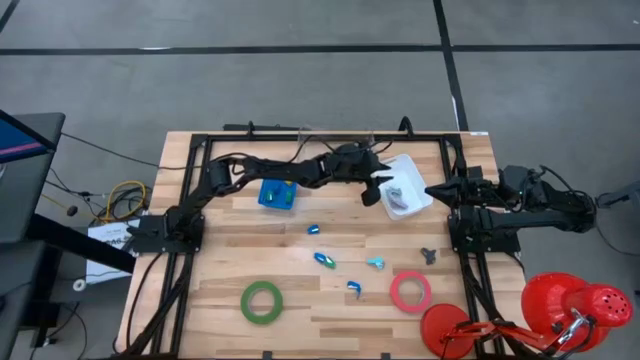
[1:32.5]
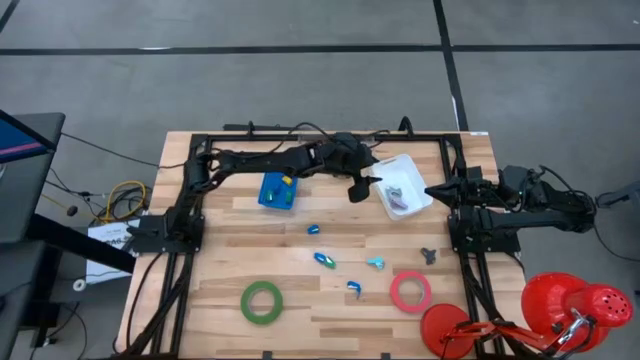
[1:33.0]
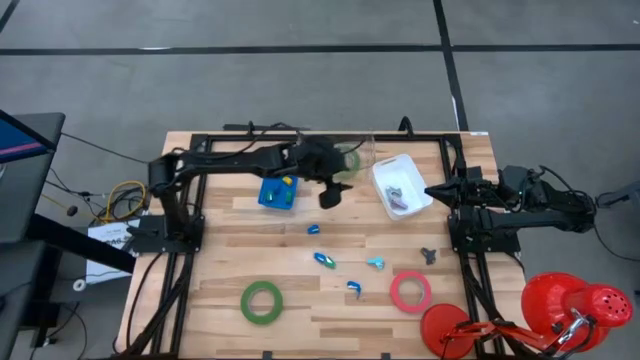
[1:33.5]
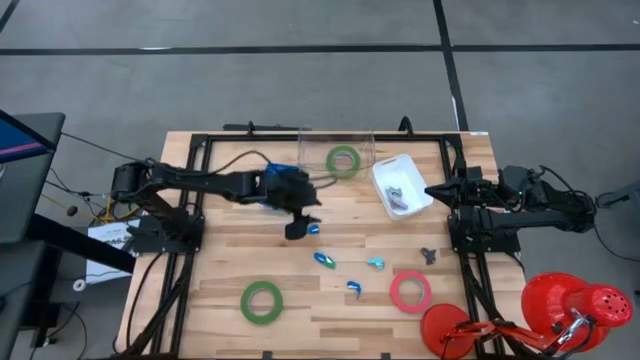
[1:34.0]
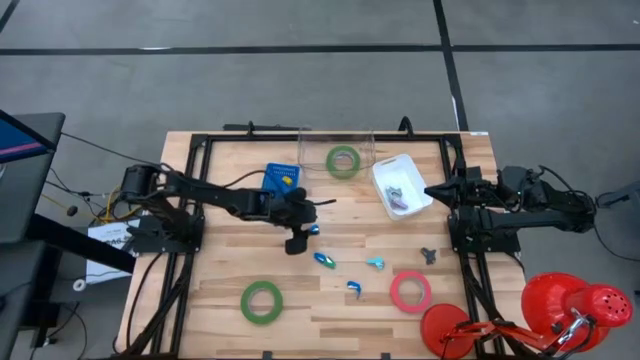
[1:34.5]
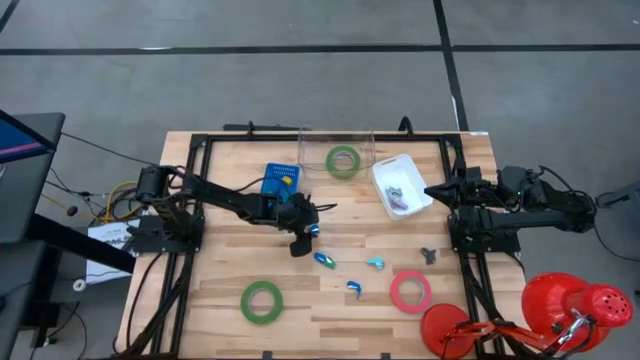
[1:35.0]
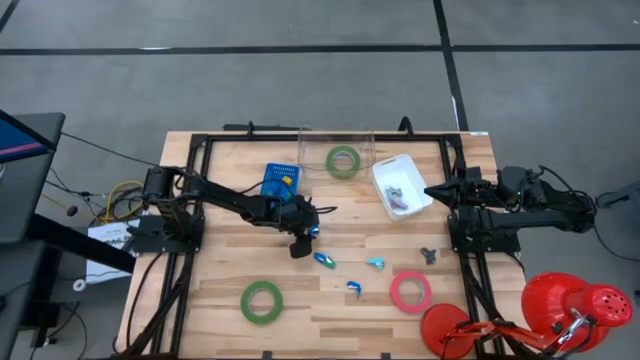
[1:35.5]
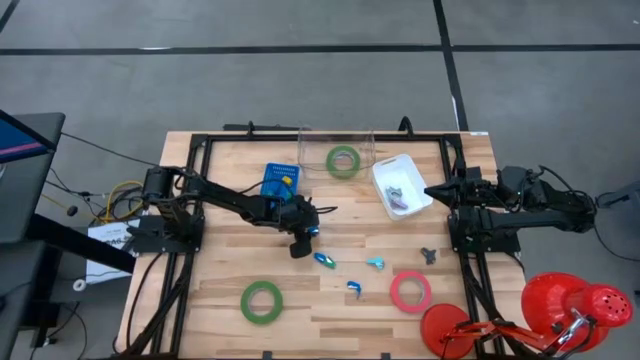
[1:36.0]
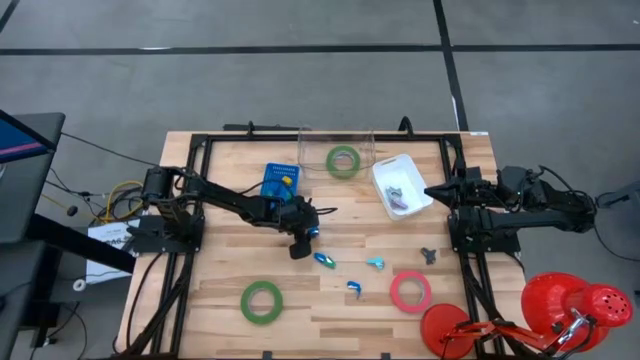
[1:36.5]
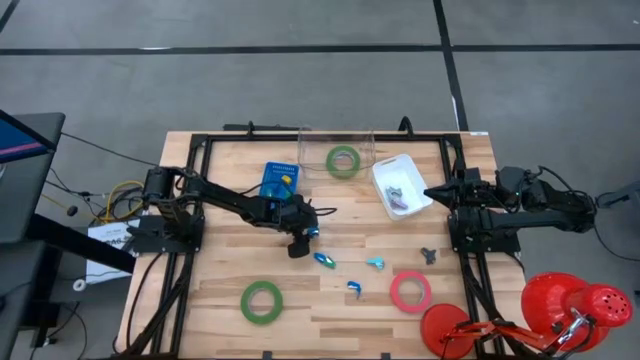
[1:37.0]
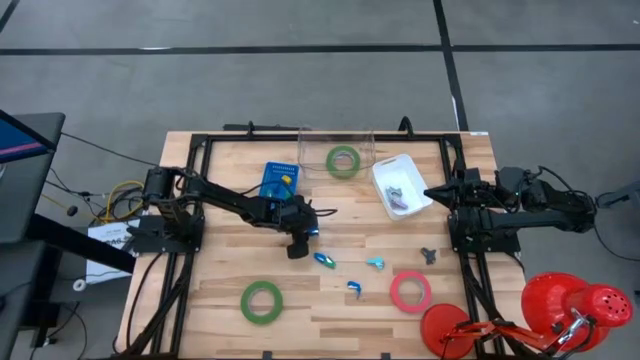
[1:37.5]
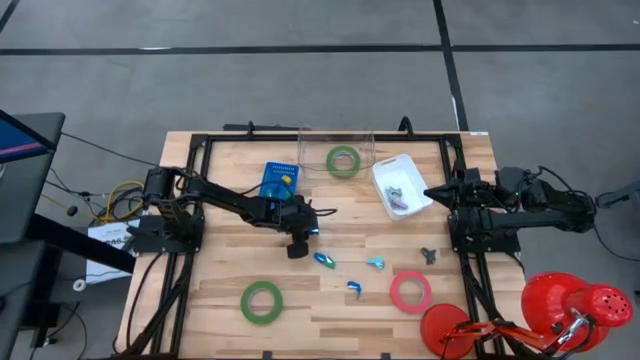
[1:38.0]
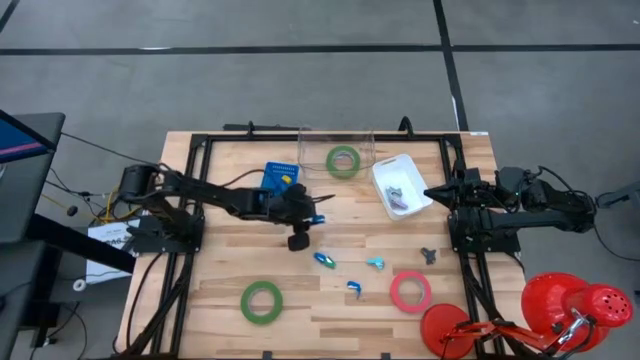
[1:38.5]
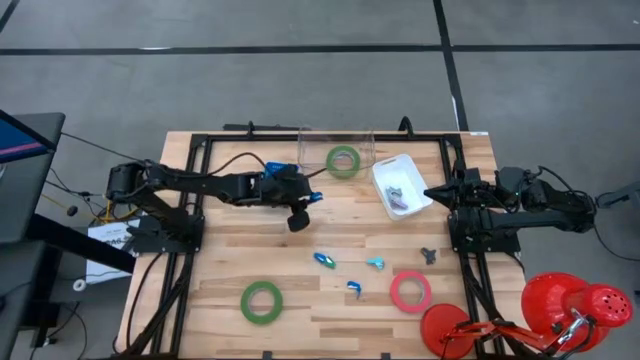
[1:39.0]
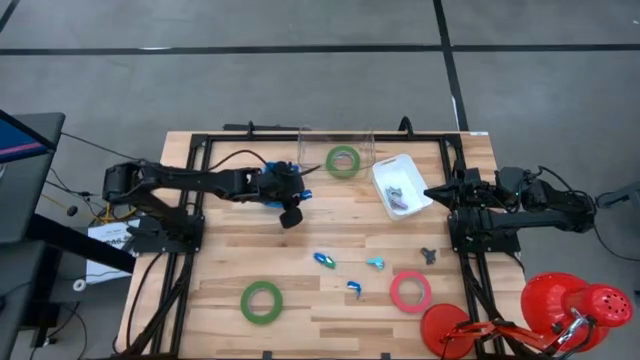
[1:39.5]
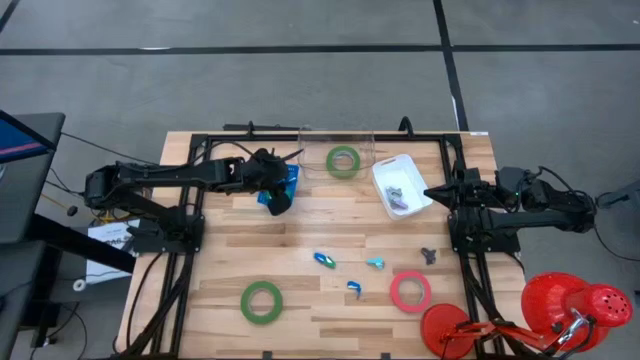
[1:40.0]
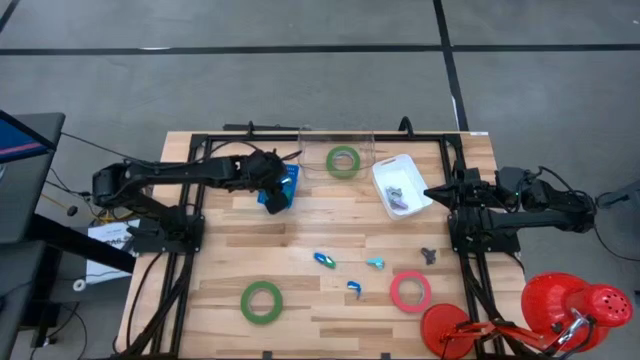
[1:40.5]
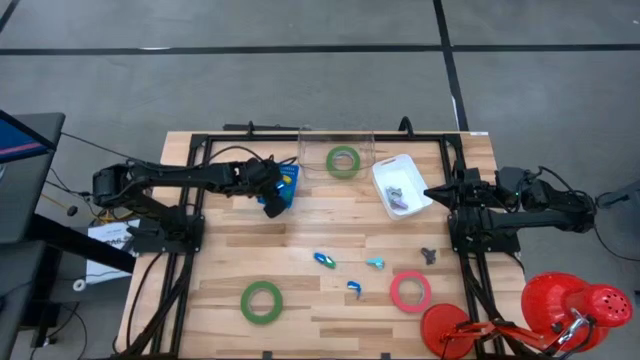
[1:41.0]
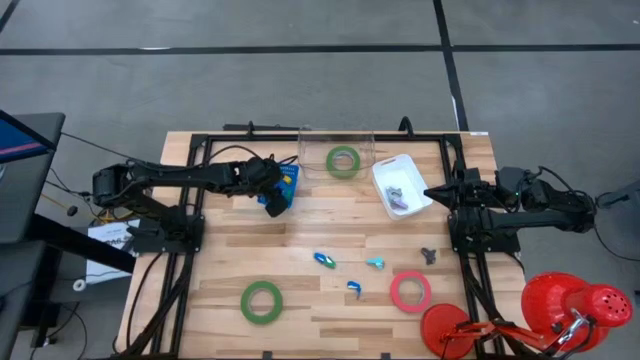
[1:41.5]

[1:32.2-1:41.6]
Task: Pick and place Stapler, Stapler remover, tape
Put the top blue stapler into the blue bin

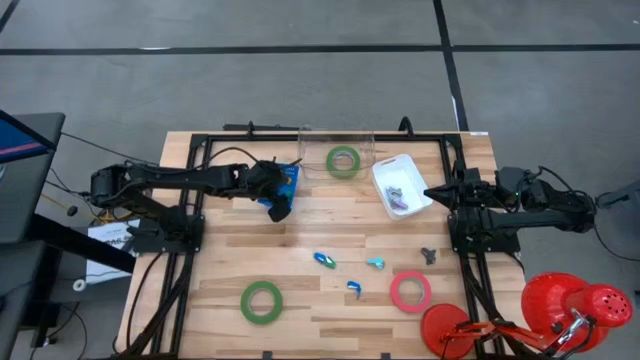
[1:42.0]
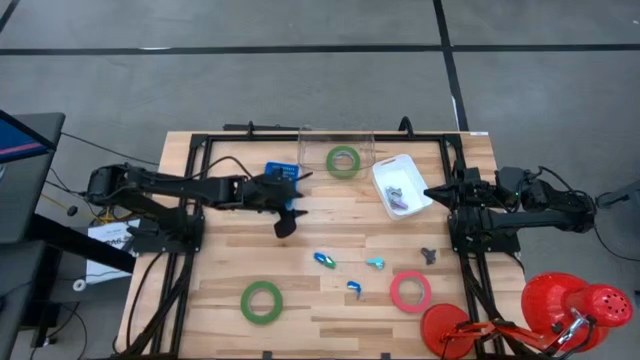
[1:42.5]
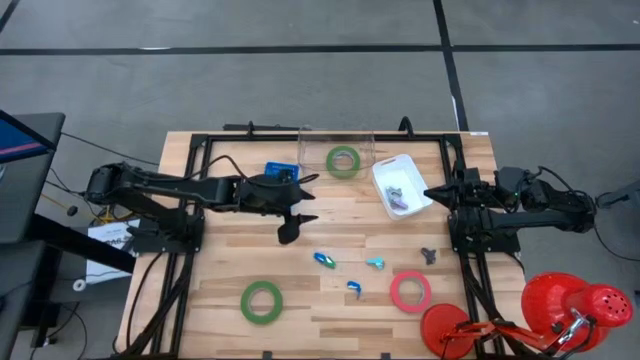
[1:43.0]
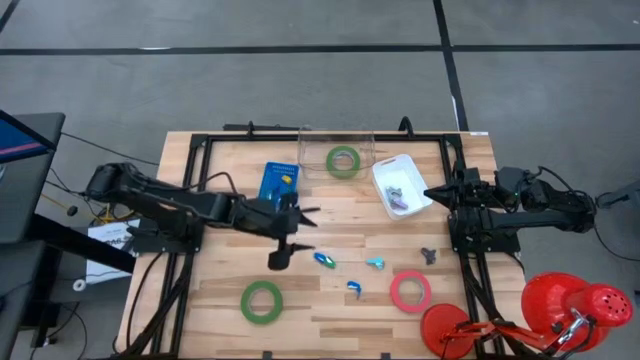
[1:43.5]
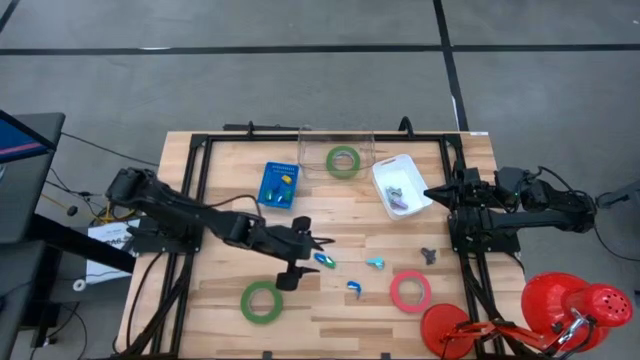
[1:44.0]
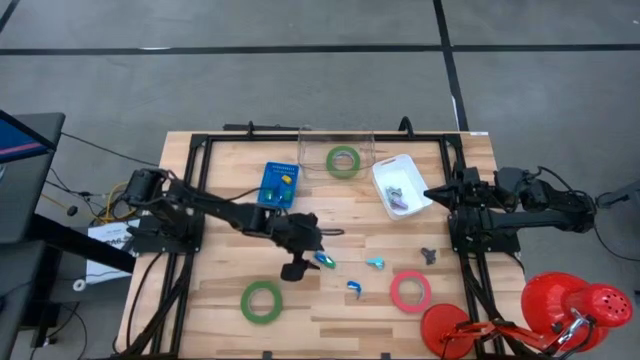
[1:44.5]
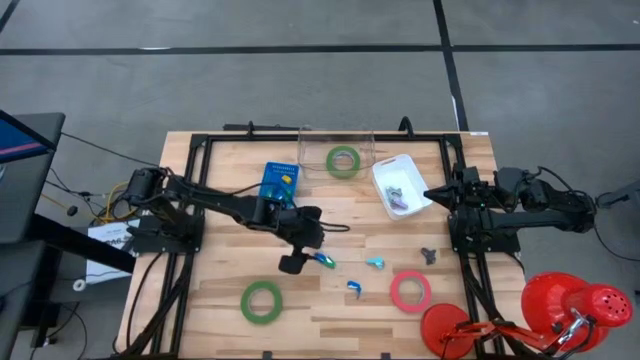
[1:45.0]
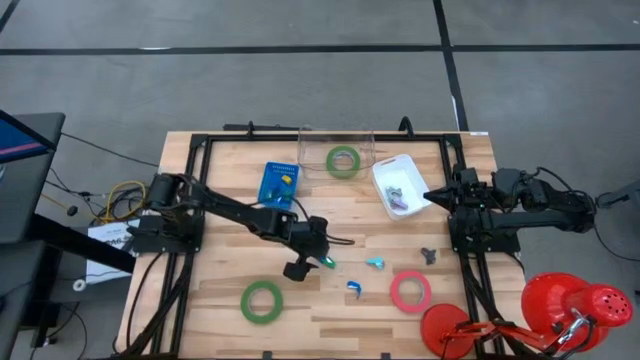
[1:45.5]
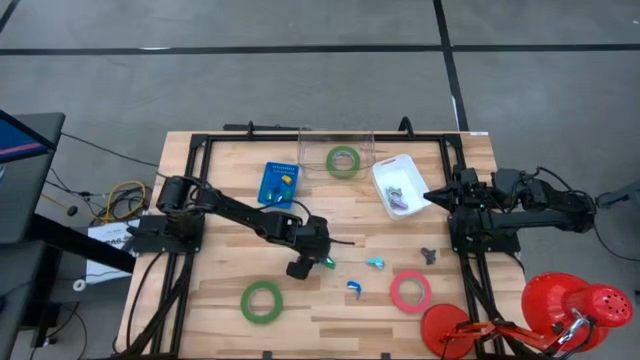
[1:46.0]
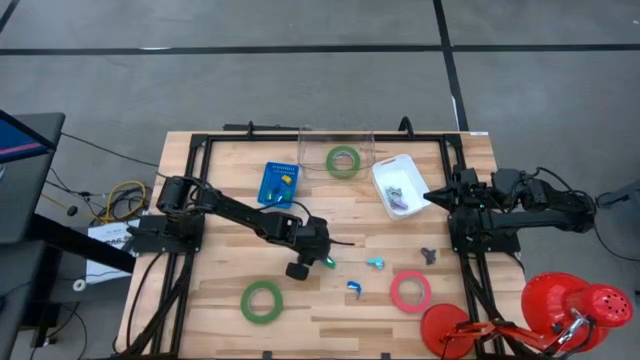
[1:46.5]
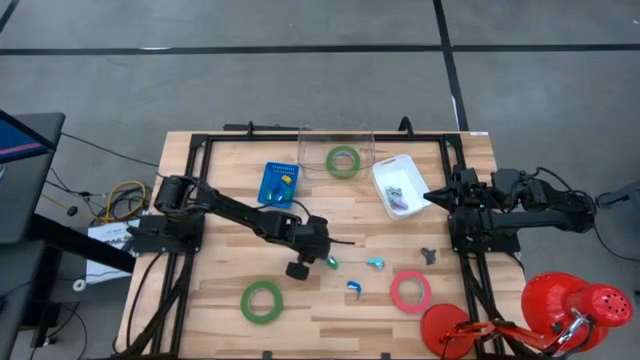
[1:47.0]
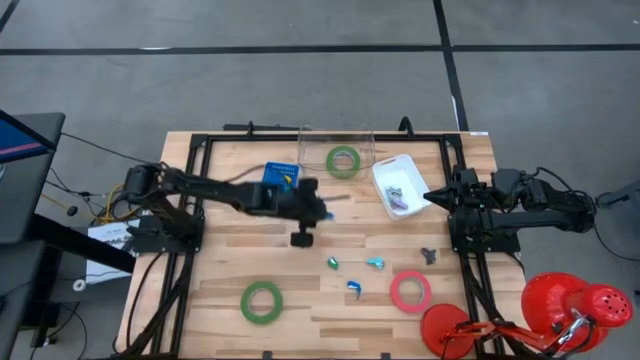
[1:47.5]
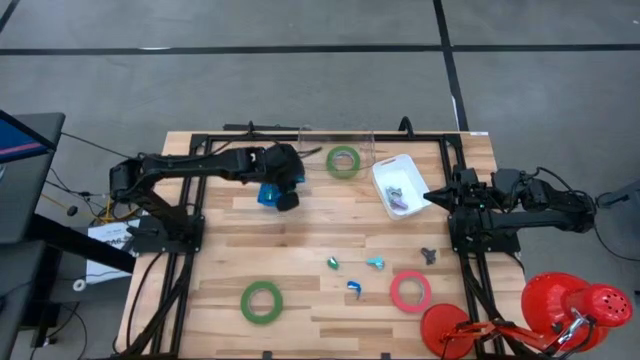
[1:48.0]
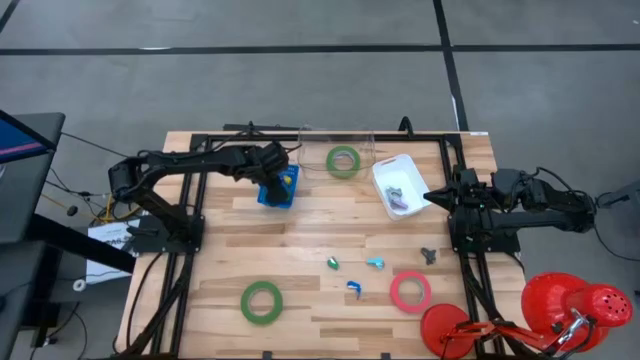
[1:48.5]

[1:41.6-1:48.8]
Put the top blue stapler into the blue bin

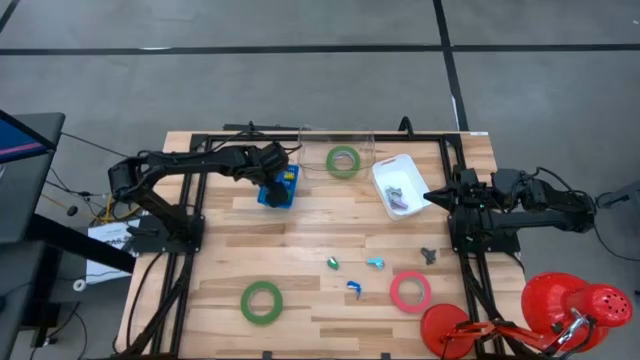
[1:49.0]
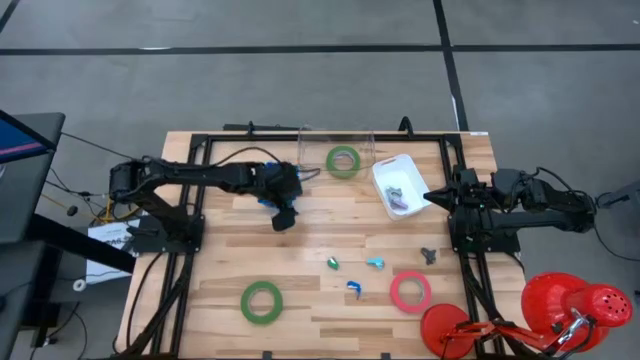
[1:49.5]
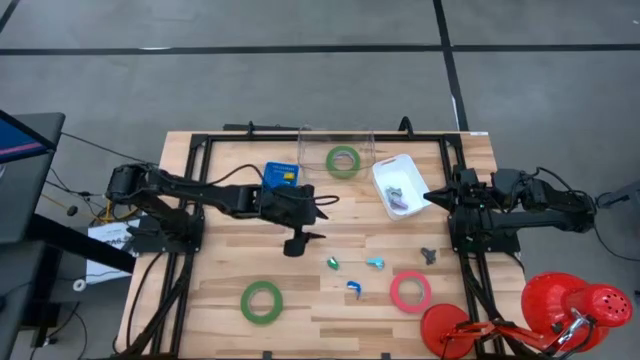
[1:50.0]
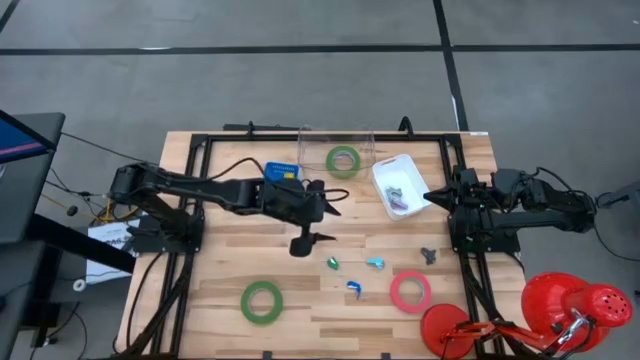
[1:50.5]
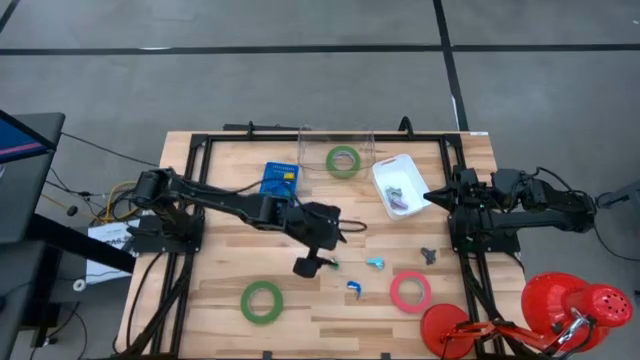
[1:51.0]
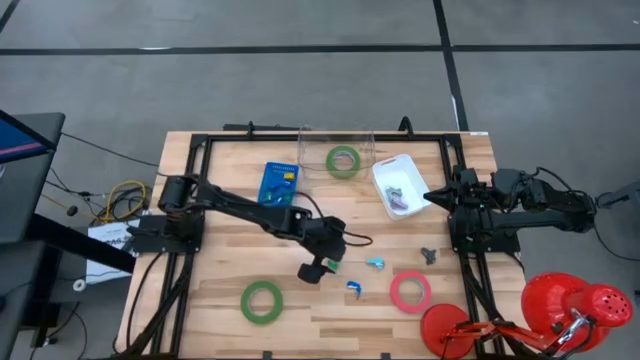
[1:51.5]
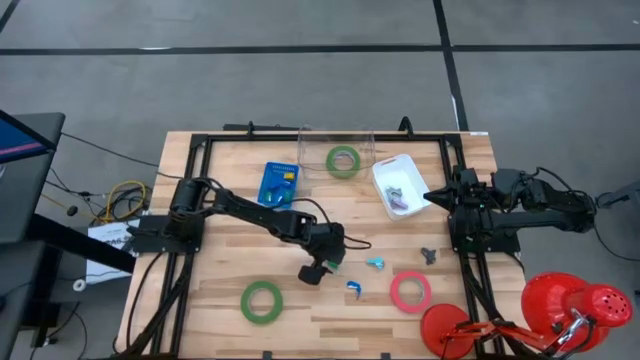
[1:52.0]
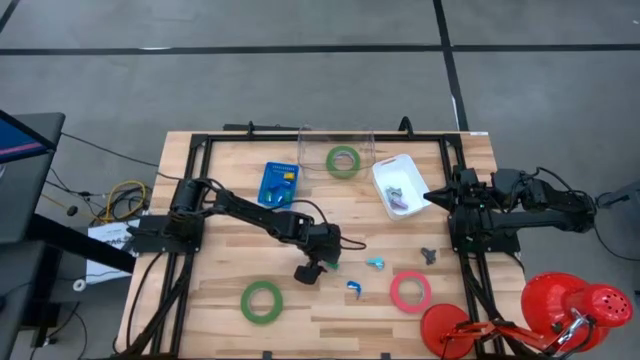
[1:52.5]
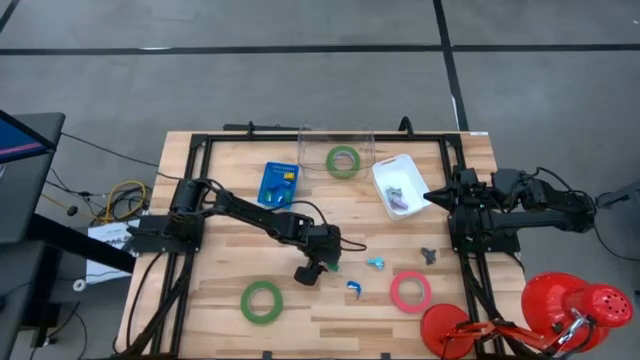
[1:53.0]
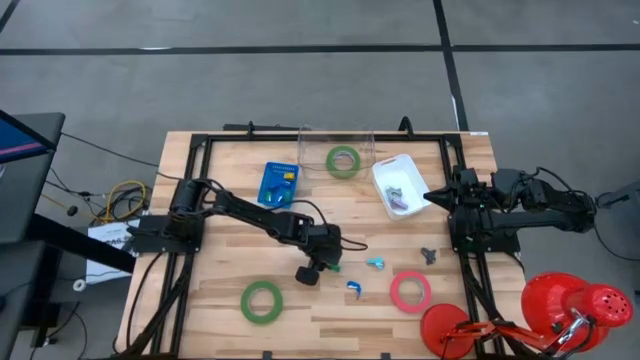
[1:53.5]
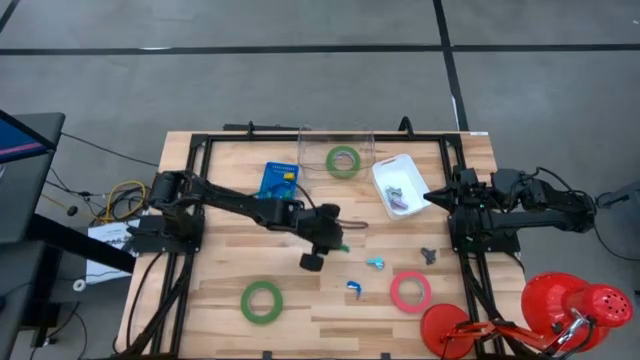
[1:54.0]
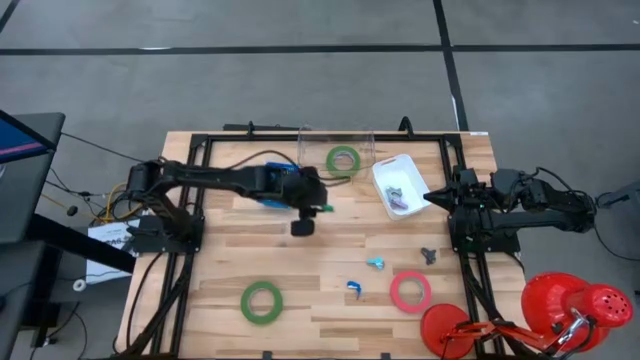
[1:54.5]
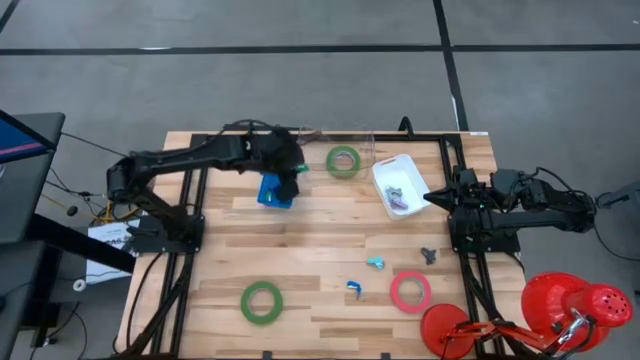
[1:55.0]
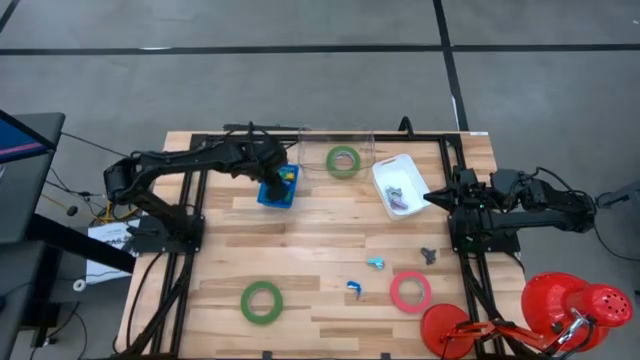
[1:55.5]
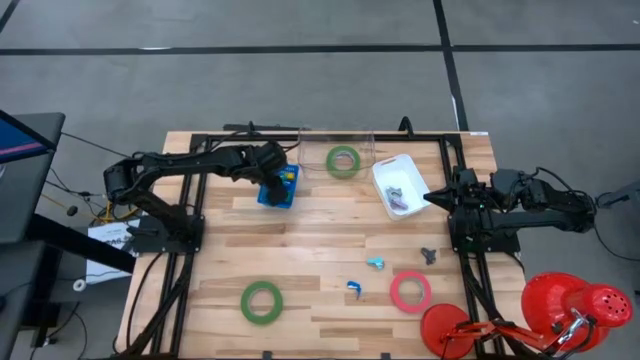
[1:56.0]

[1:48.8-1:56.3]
Put the green stapler into the blue bin
